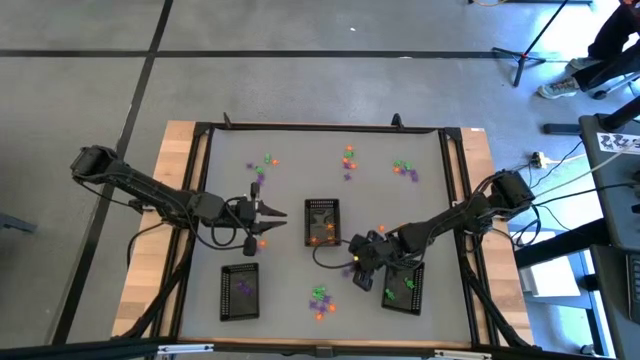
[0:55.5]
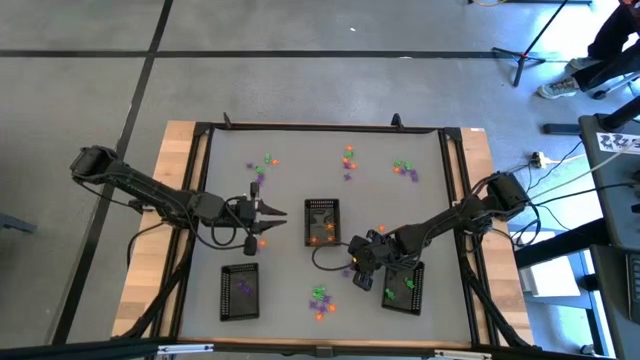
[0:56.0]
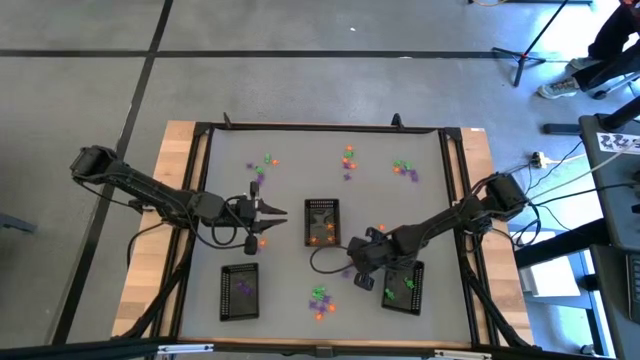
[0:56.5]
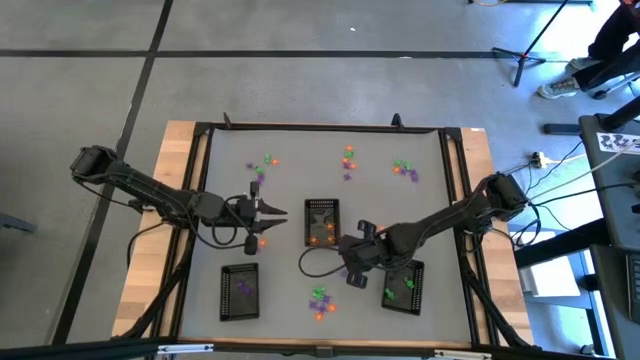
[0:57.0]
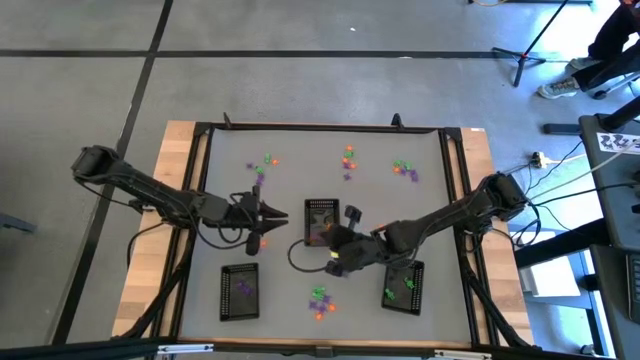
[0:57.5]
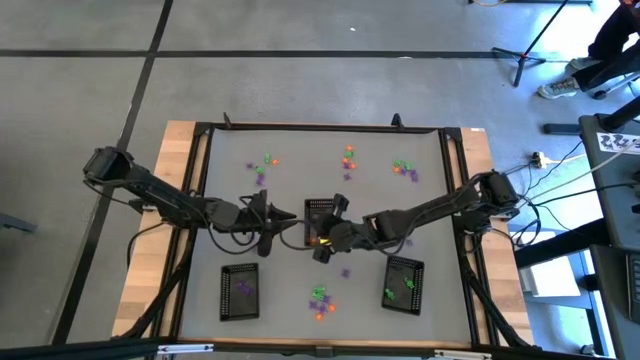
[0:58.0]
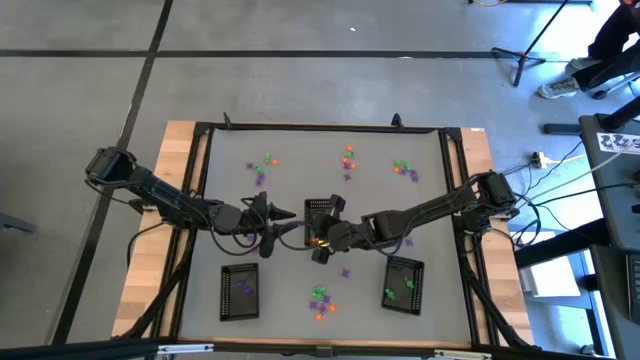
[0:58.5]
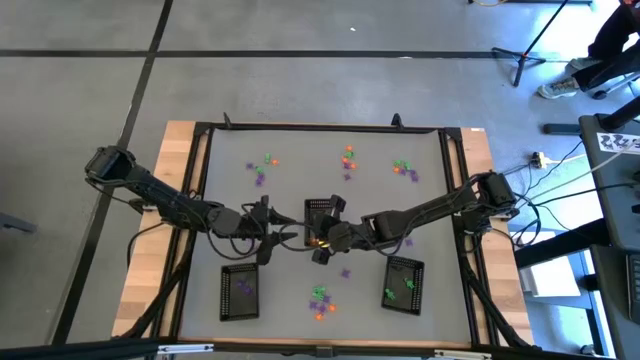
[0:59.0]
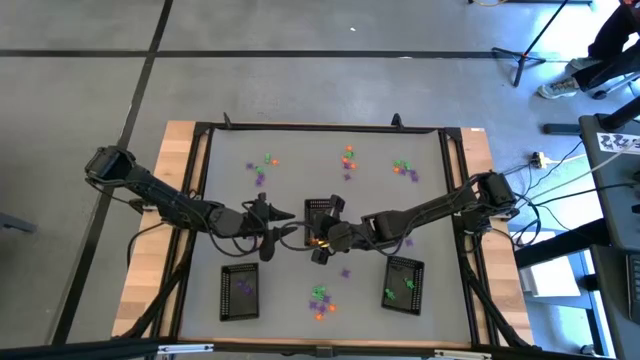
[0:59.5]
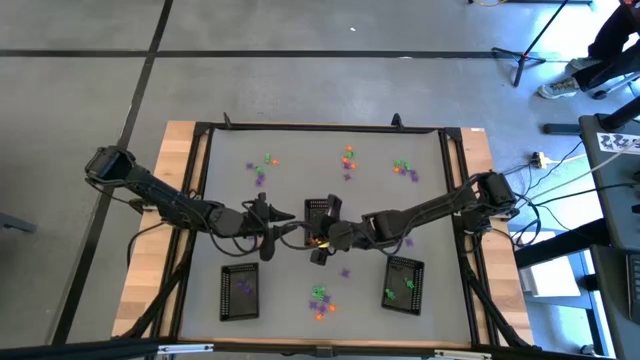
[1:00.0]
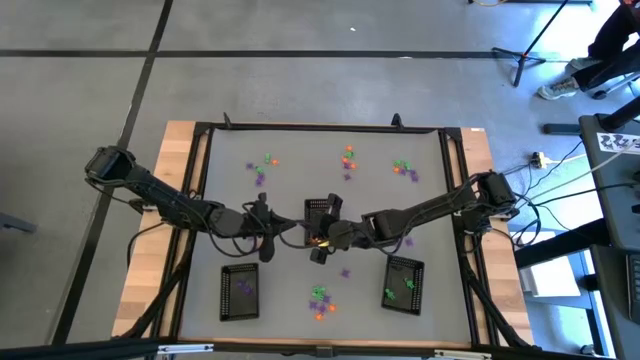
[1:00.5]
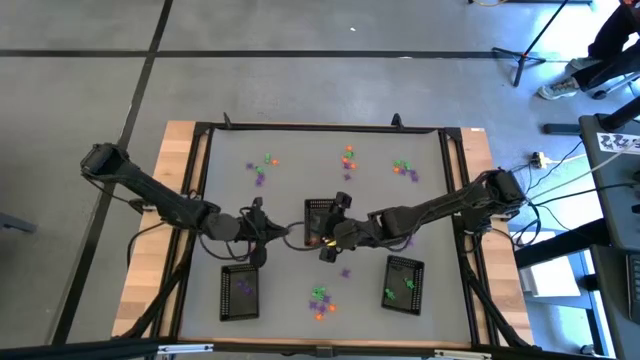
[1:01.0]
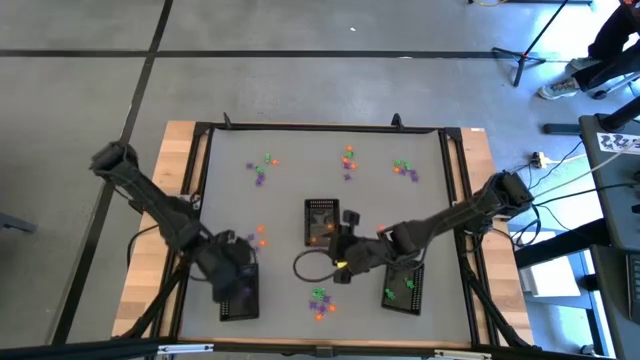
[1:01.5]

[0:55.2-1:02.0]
Task: Sort Halloween decoration
Put the violet spider toy into the bottom left black bin

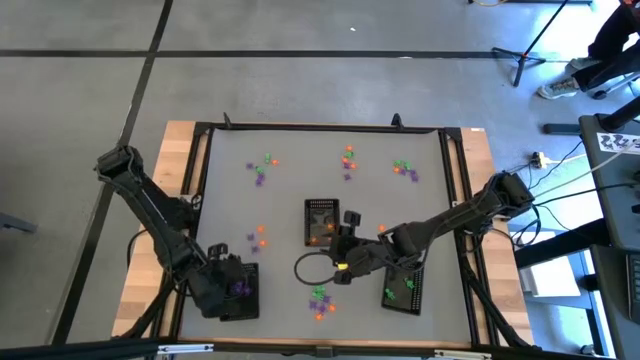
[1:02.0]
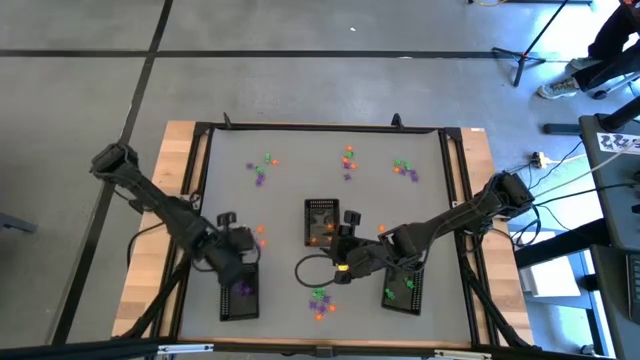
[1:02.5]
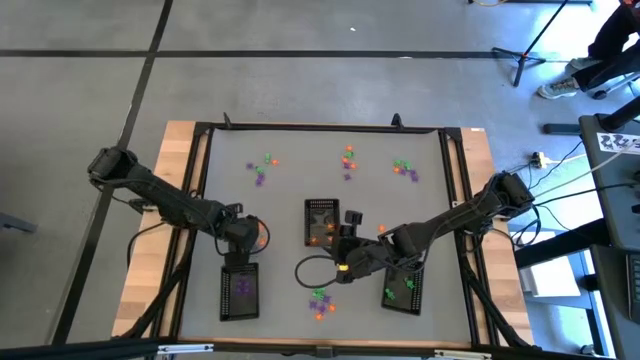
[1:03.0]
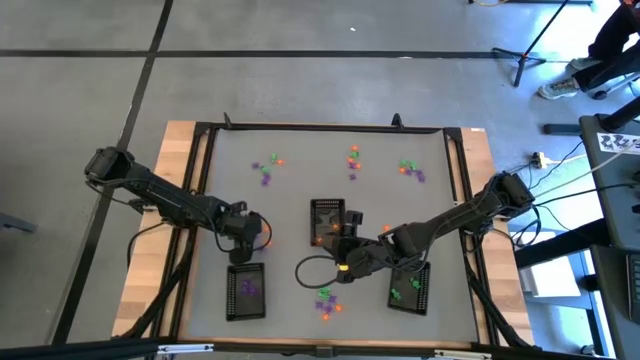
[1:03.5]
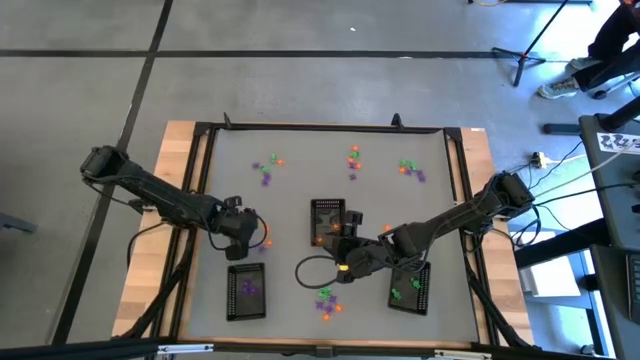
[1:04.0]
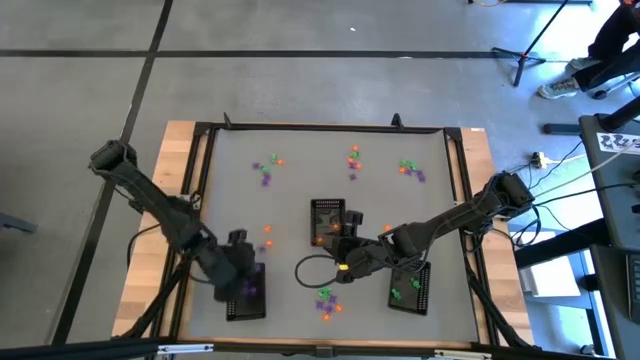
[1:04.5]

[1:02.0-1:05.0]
Put the violet spider toy into the bottom left black bin

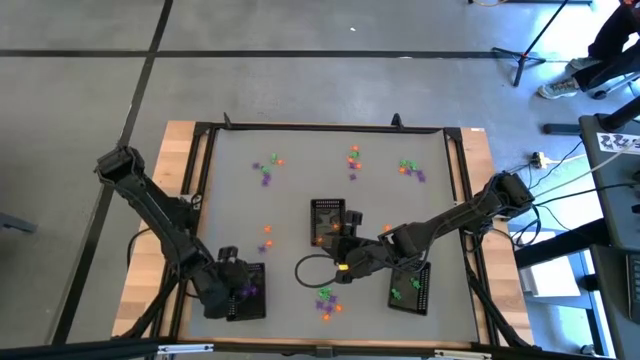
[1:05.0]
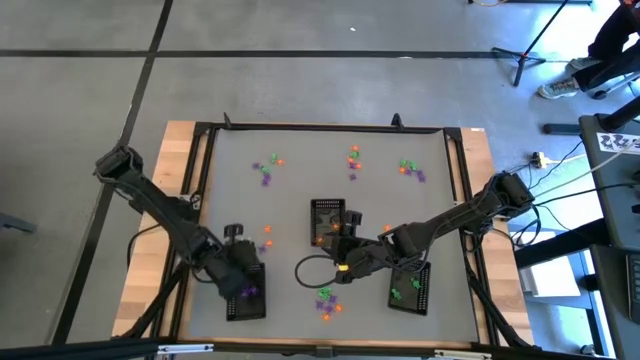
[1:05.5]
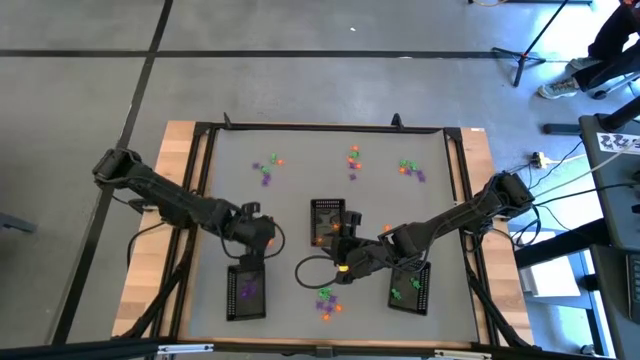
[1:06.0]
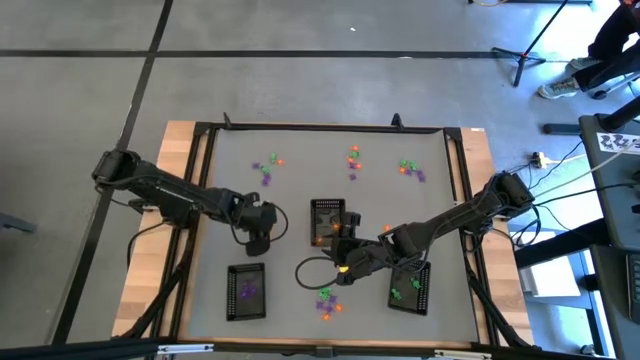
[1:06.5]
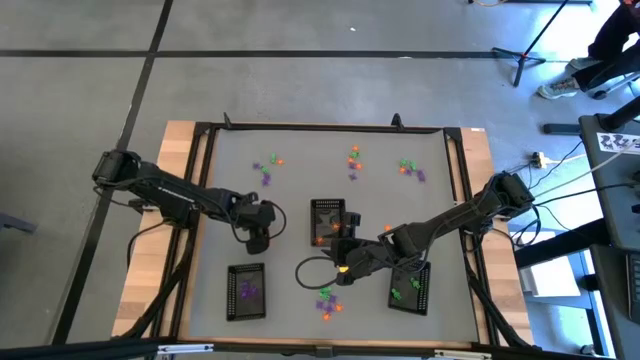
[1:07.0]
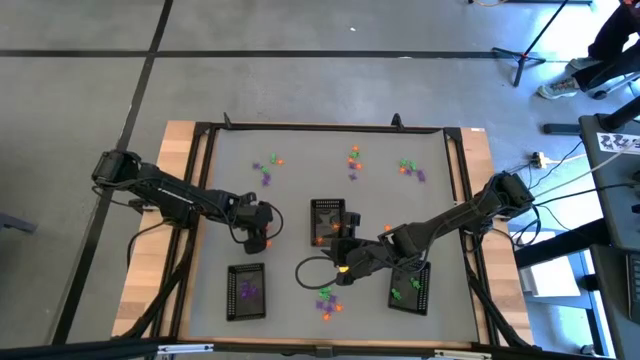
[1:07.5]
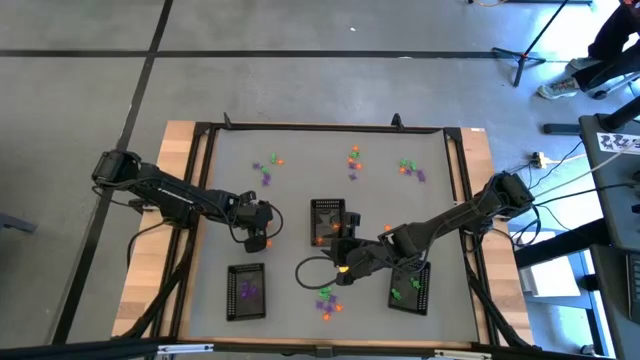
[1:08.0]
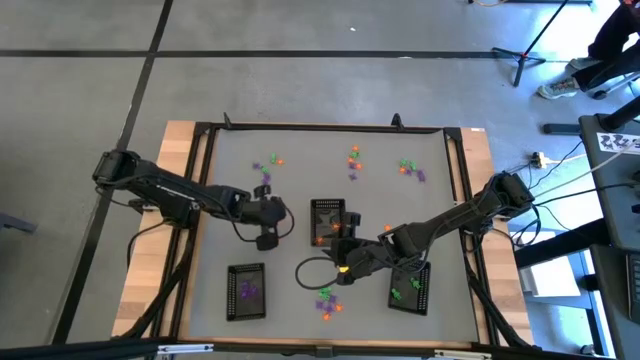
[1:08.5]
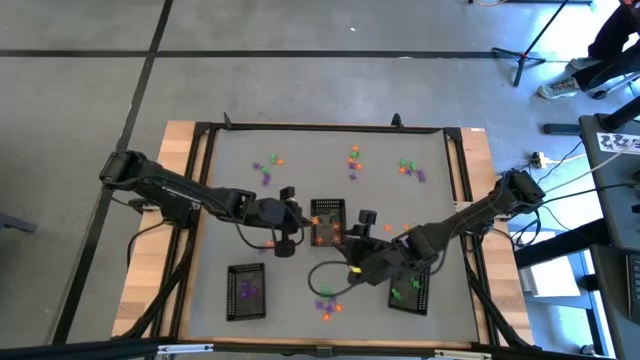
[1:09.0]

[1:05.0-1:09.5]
Put the orange spider toy into the top black bin

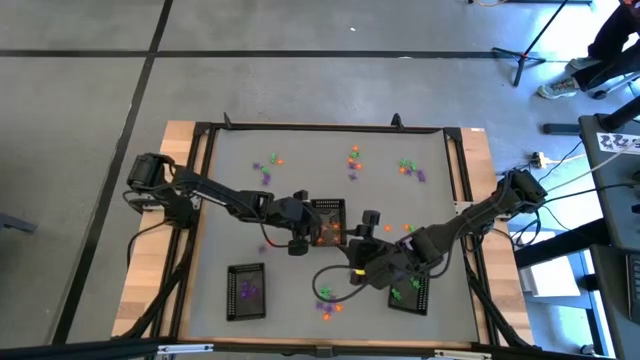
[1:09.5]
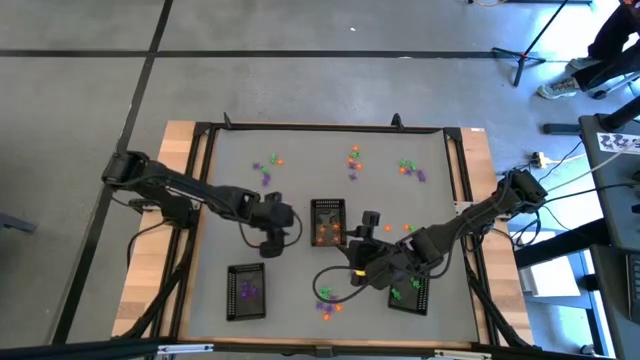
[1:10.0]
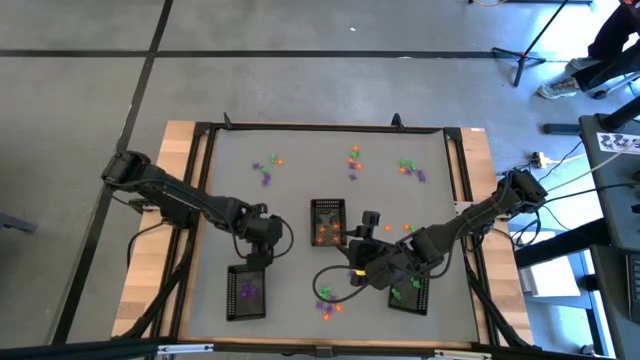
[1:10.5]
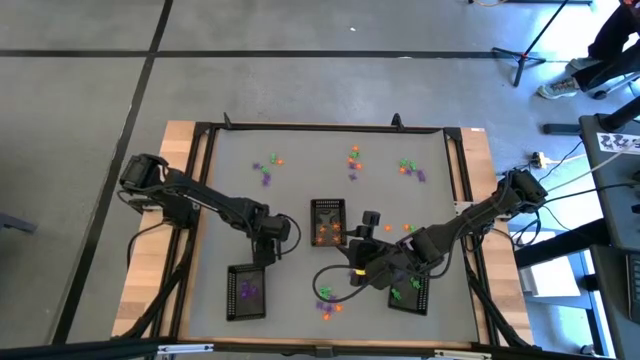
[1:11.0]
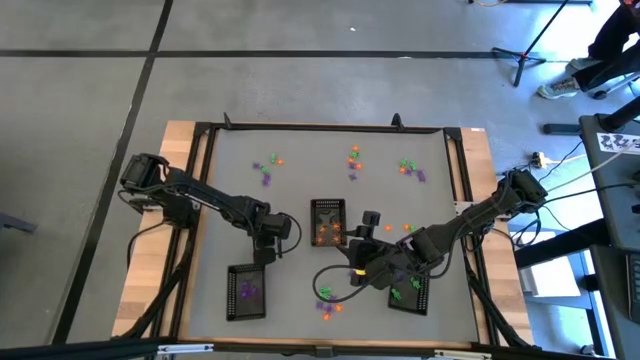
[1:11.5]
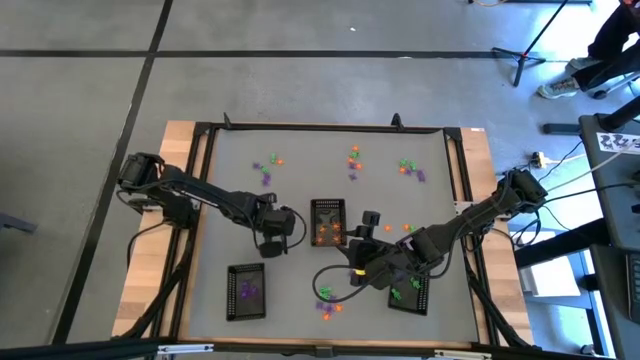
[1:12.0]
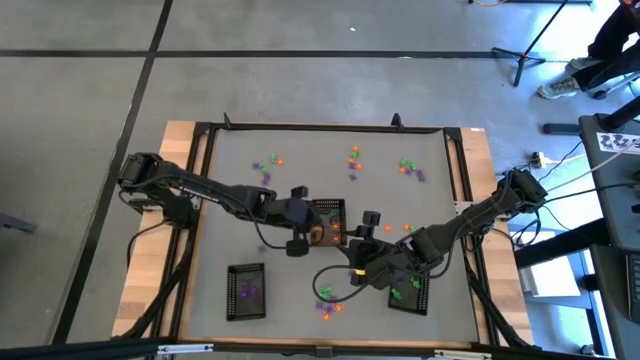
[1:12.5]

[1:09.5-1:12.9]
Put the orange spider toy into the top black bin

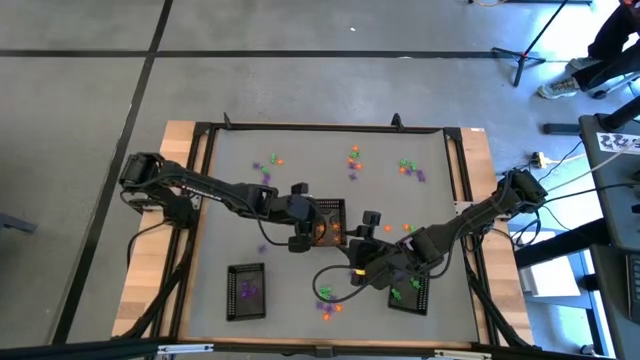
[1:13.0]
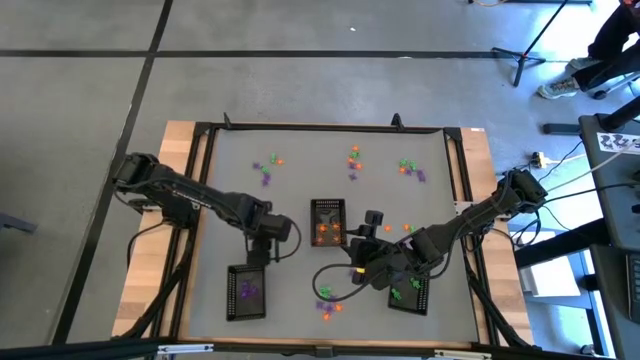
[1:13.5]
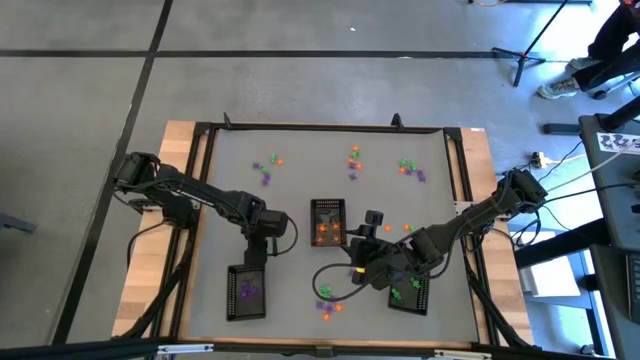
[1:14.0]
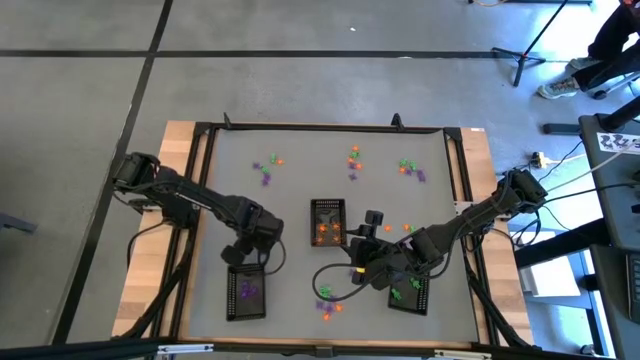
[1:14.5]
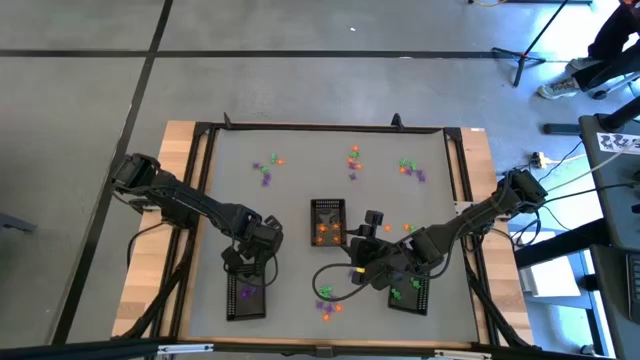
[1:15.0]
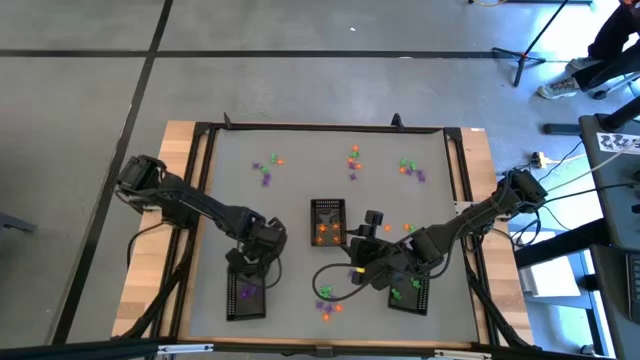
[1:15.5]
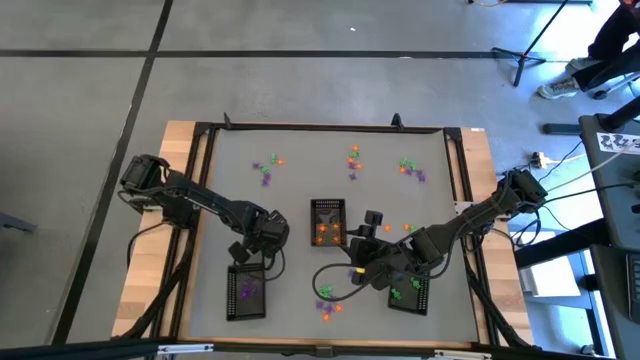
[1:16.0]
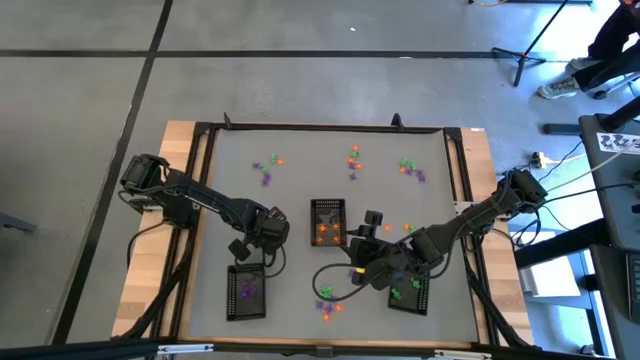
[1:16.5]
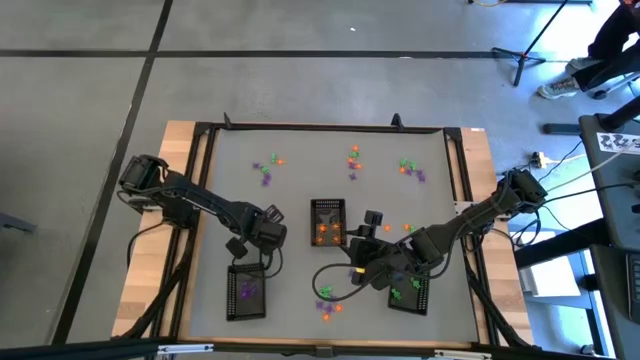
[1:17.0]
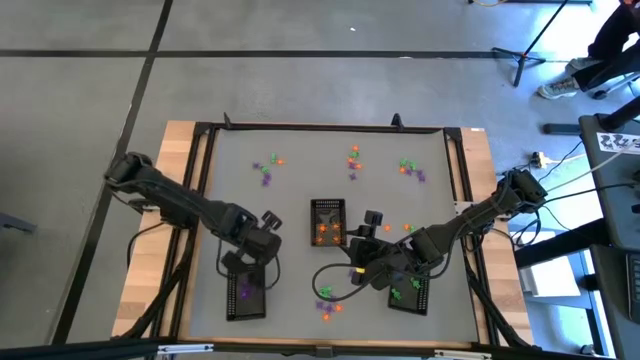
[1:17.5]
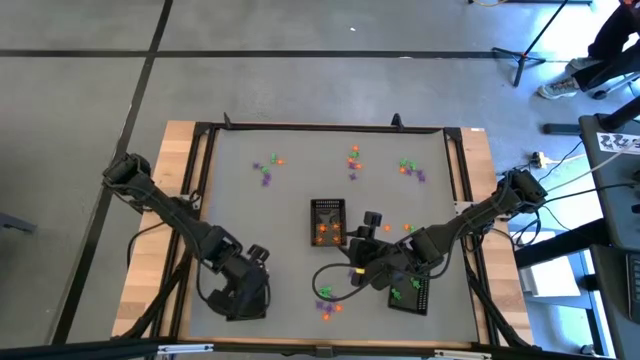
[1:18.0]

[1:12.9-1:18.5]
Put the violet spider toy into the bottom left black bin
